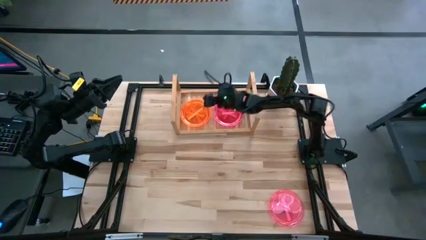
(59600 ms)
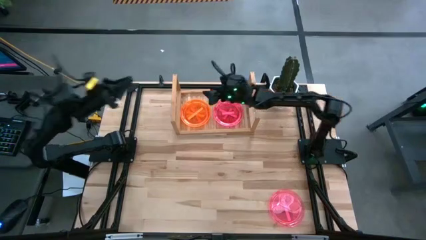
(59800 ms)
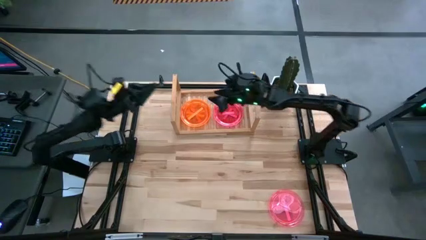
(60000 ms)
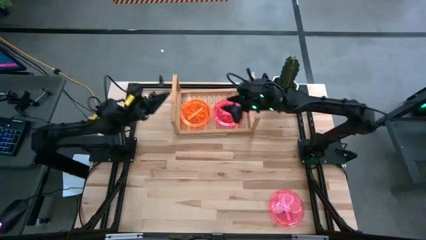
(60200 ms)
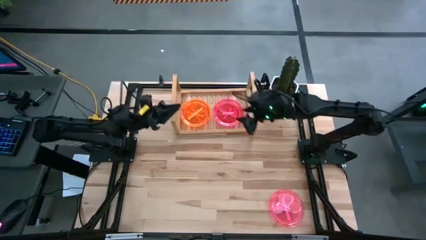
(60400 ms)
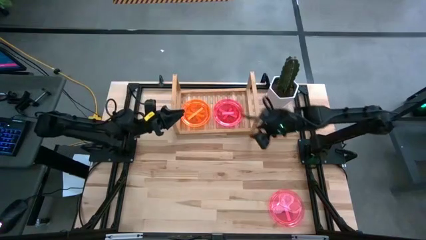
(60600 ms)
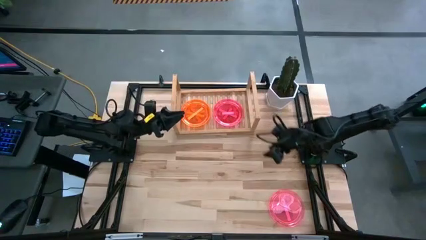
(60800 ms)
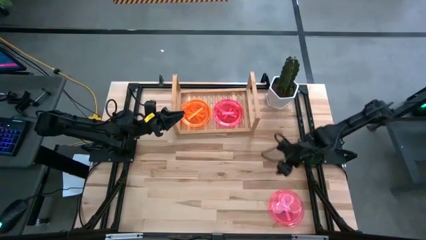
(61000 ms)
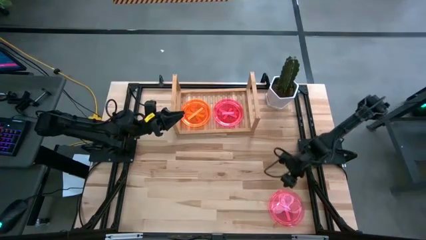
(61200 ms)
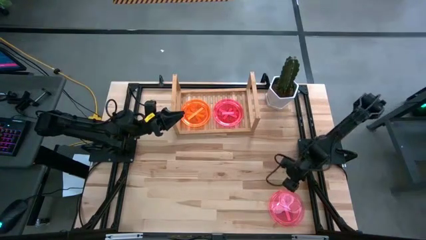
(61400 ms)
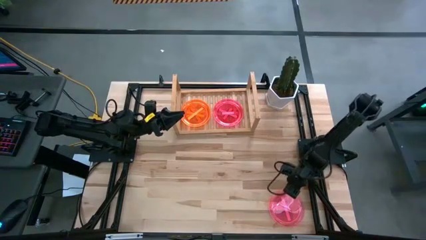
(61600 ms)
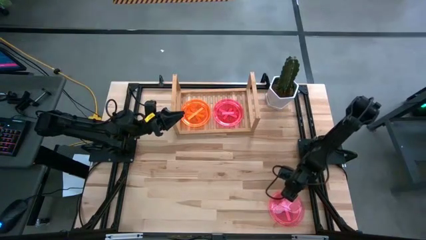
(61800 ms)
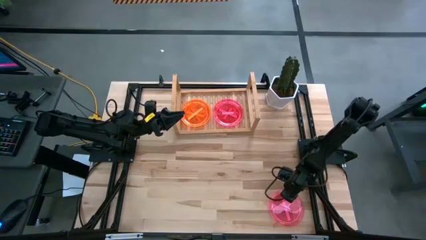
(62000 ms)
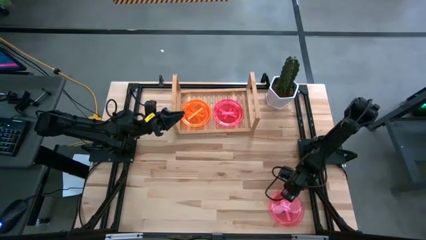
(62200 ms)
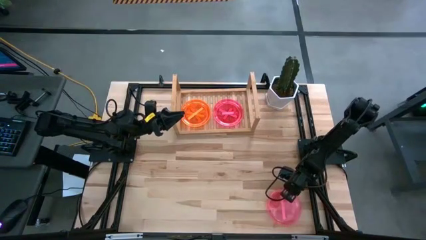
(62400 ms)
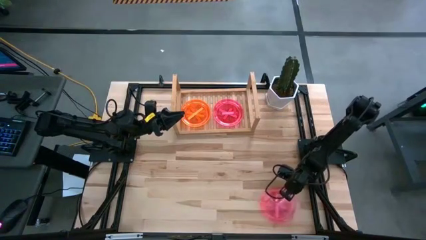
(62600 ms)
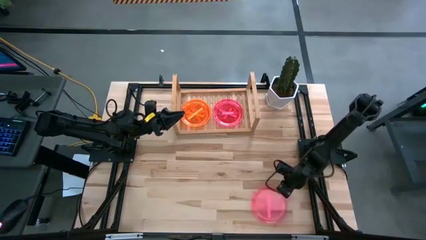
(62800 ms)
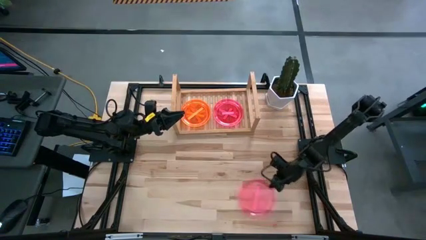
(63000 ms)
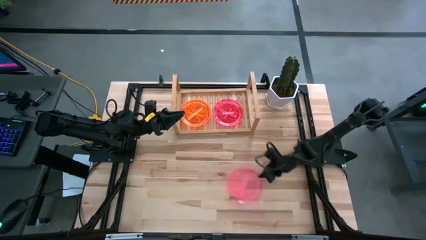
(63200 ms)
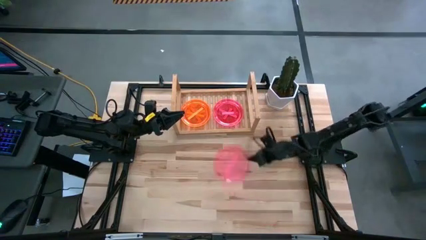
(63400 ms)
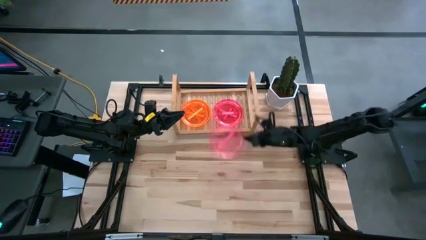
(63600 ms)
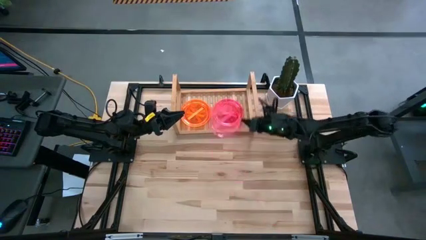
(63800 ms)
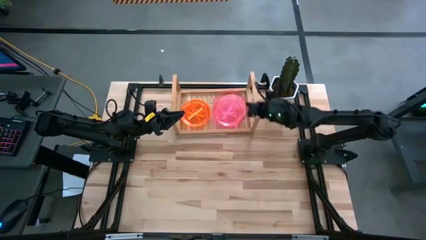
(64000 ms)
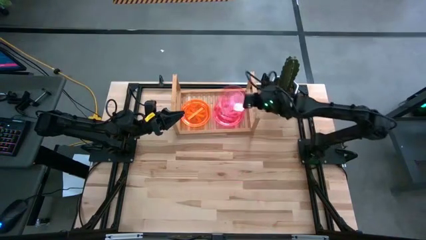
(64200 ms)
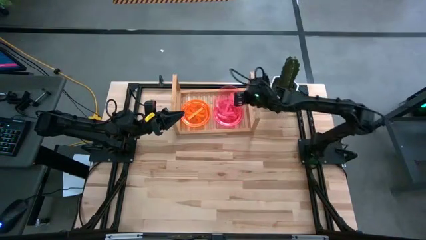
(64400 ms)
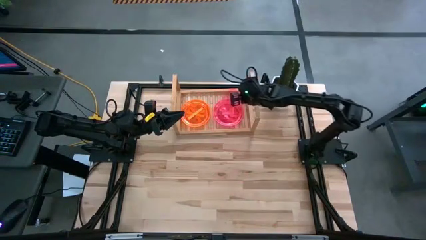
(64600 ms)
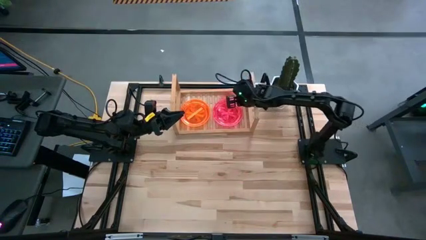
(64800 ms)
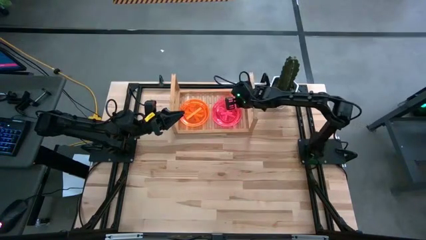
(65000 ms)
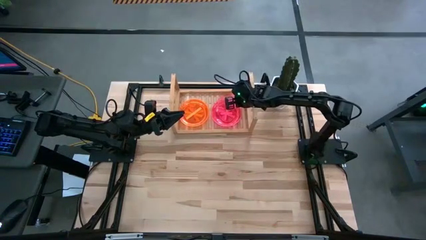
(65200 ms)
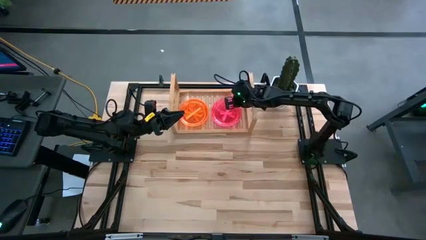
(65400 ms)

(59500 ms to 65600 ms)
Task: Place and stack plates onto a shelf
Stack the pink plate on top of the pink plate

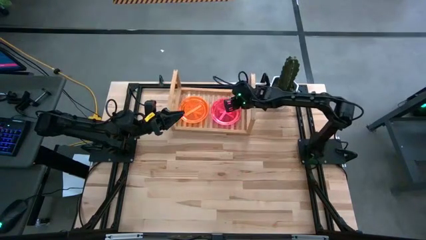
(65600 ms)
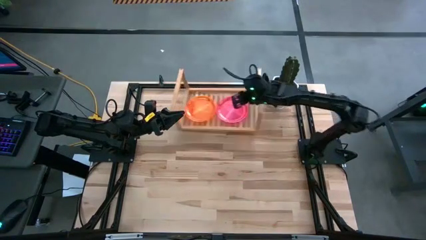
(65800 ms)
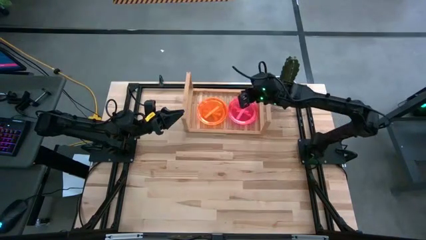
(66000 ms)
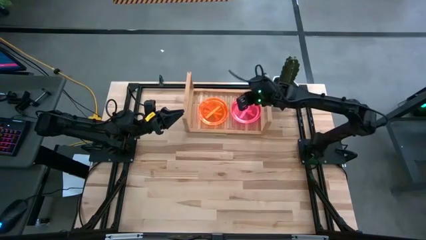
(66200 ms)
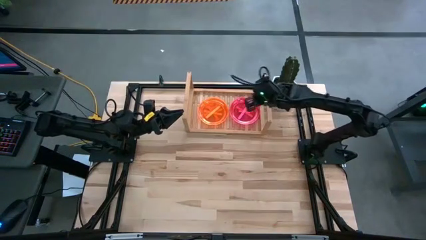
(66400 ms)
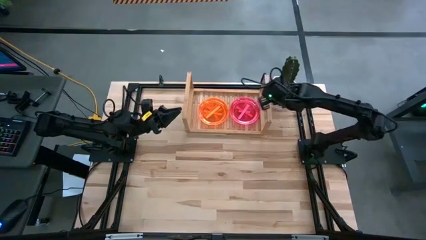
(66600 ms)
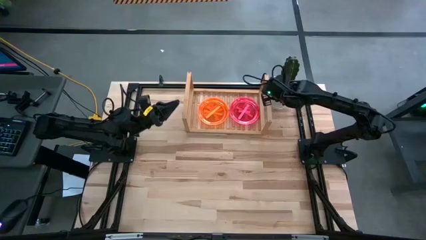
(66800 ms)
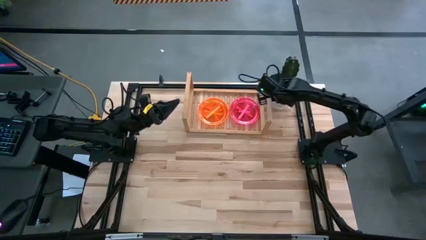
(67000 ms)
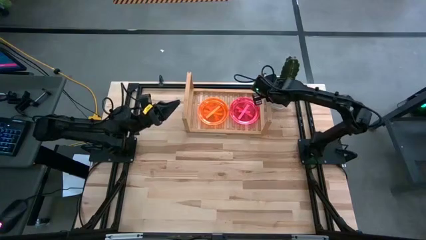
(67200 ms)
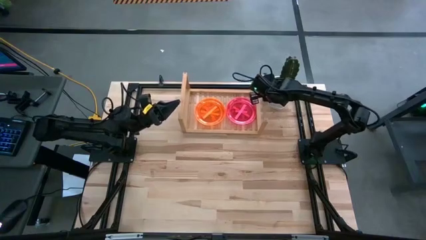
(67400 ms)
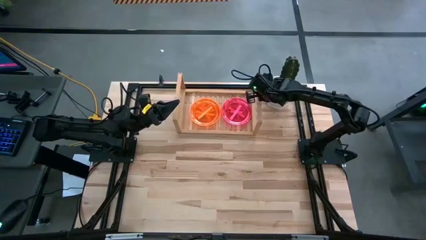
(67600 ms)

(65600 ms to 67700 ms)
Adjust the shelf

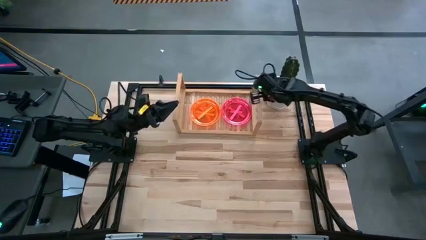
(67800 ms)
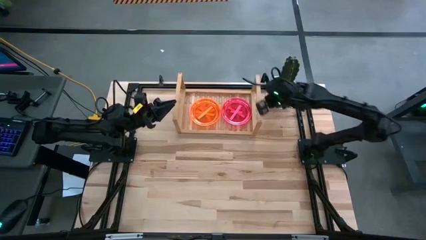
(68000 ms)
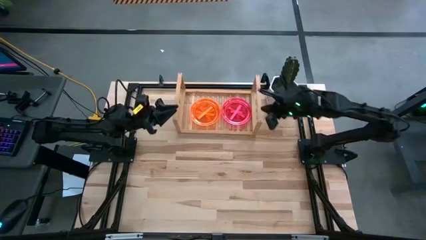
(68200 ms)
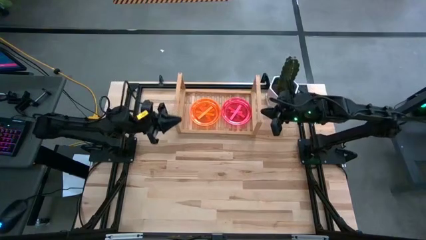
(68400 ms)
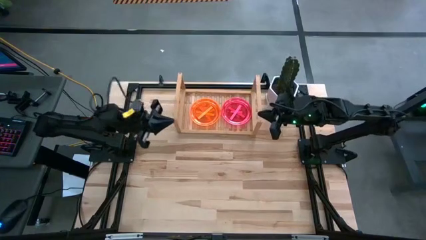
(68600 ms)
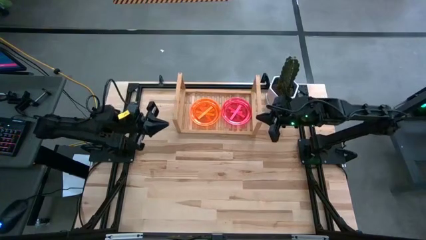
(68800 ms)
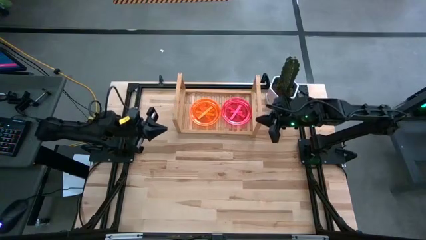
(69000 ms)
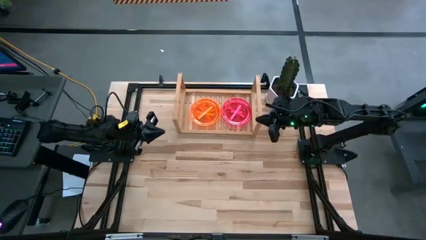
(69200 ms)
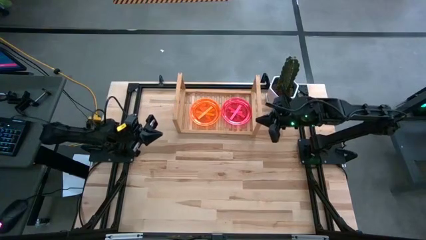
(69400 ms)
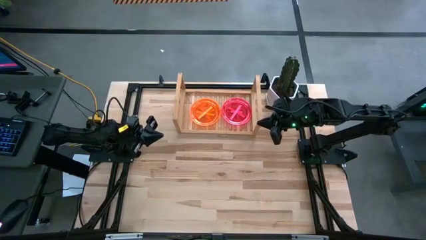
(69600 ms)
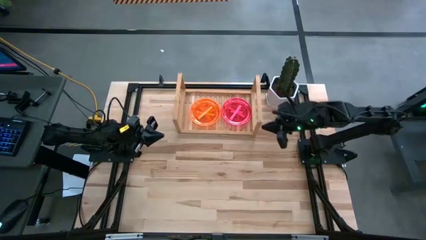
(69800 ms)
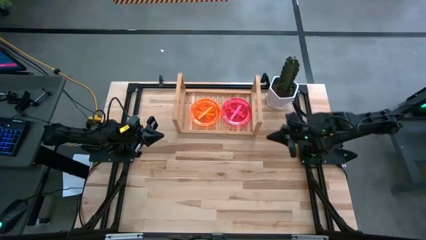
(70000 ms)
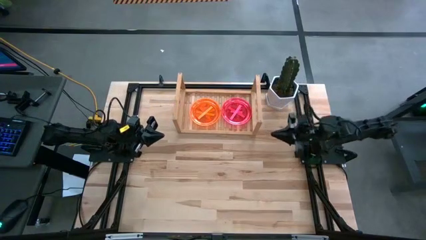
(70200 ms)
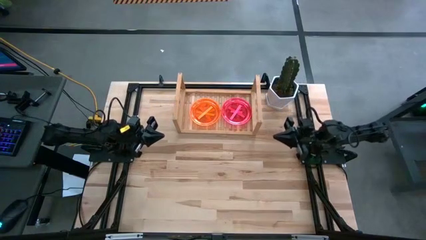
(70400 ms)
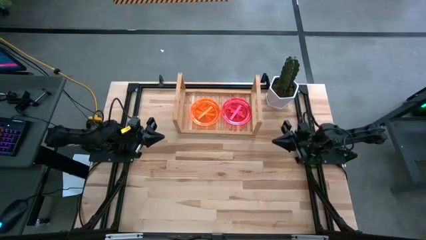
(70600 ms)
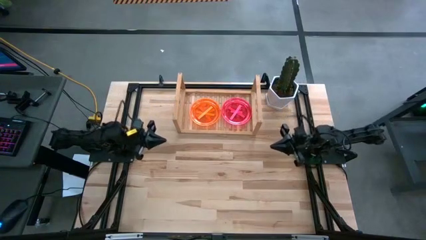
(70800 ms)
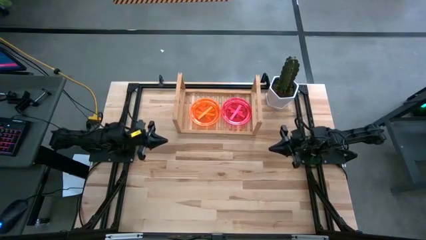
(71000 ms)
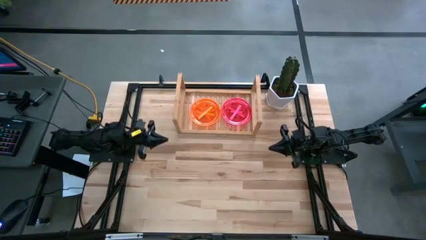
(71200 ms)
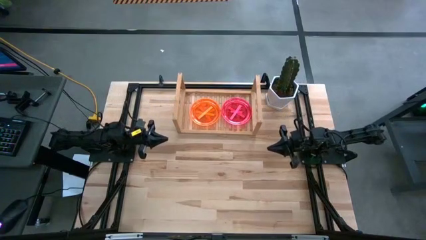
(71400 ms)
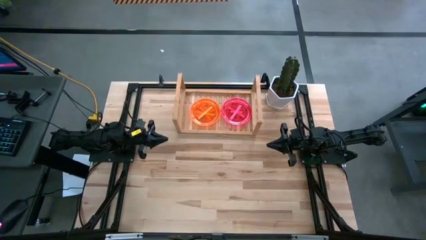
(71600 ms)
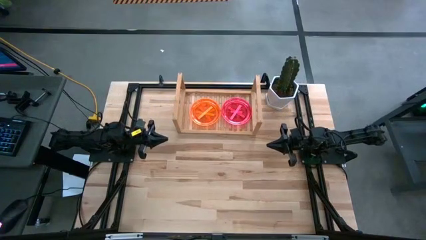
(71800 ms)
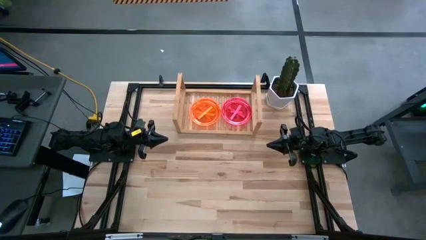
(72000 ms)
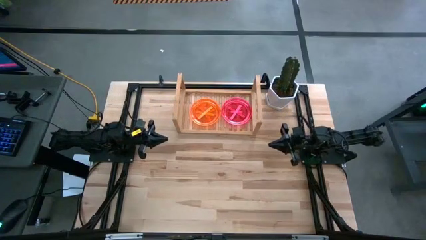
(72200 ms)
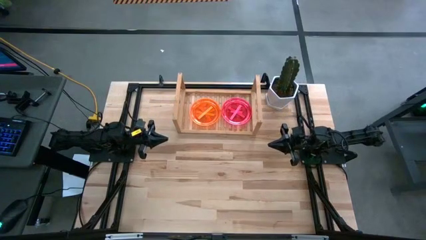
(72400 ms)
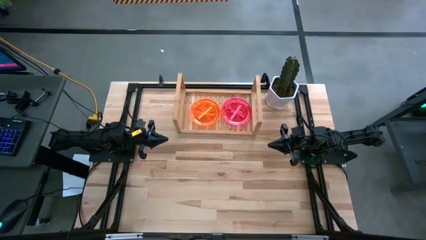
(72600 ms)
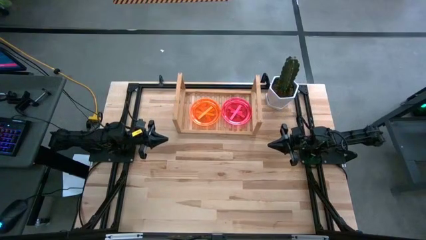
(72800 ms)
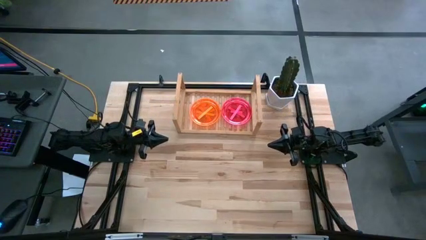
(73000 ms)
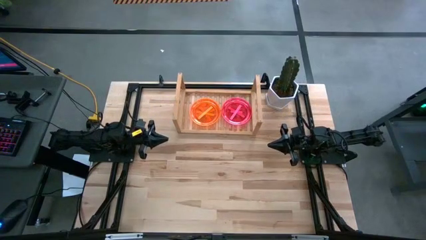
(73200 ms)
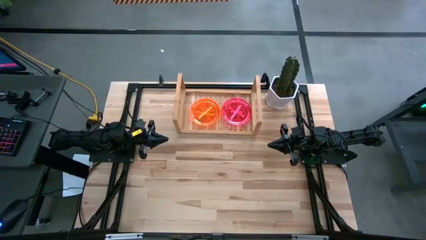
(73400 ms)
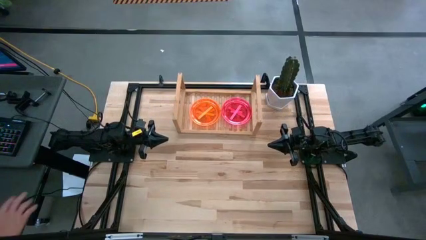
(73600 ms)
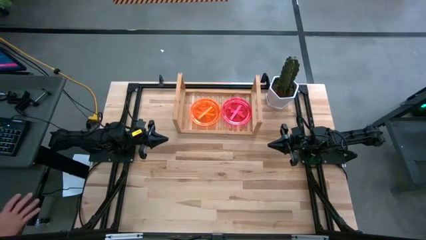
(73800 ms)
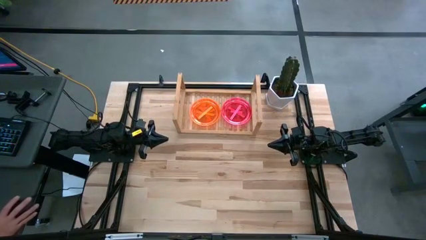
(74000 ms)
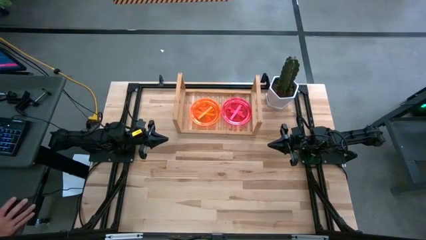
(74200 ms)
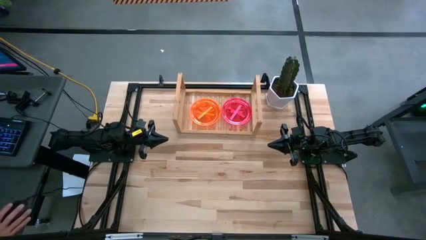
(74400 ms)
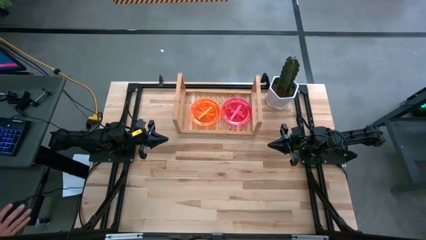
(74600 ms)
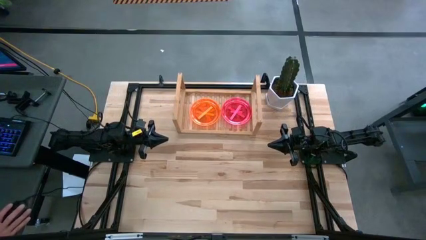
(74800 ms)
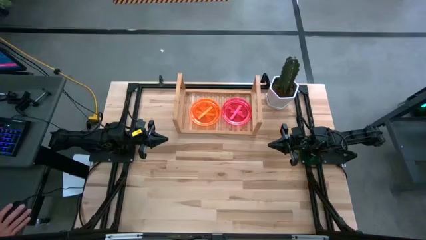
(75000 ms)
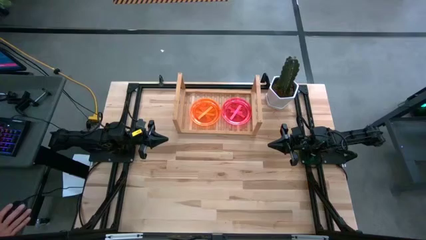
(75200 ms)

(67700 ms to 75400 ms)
Return to Home Position

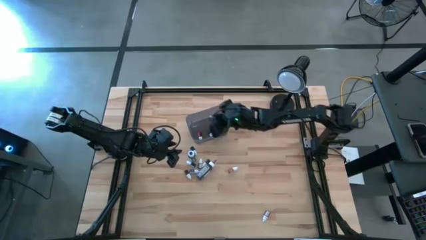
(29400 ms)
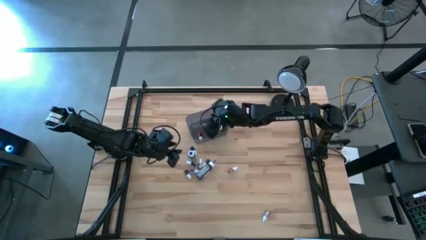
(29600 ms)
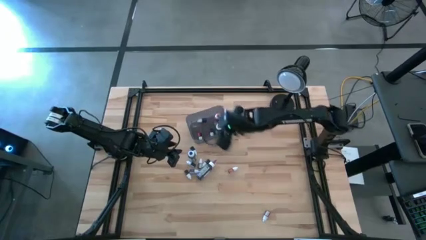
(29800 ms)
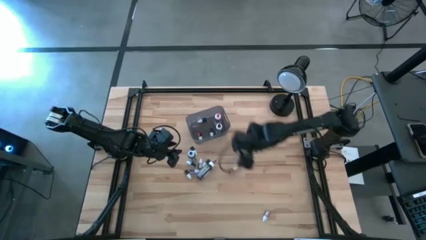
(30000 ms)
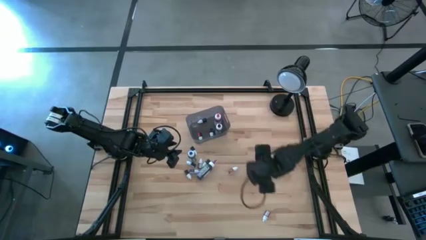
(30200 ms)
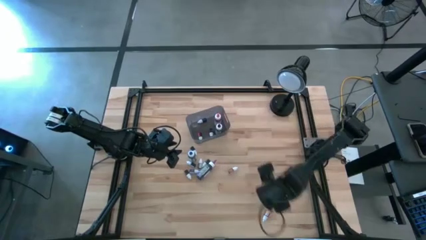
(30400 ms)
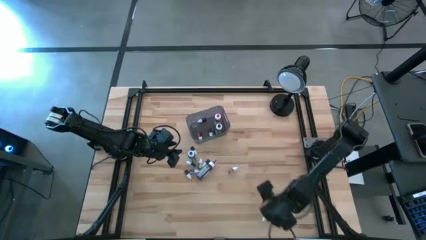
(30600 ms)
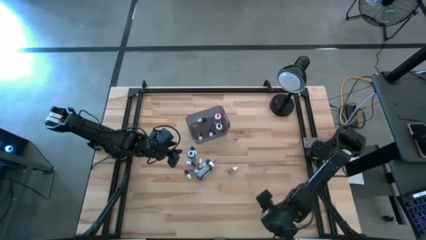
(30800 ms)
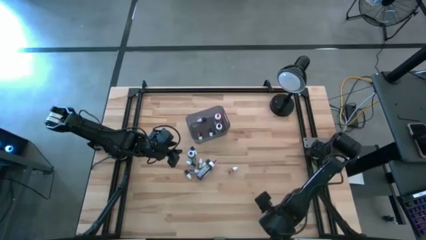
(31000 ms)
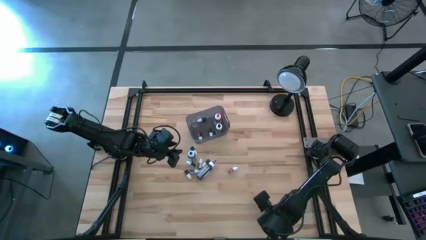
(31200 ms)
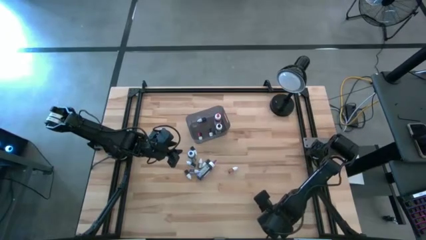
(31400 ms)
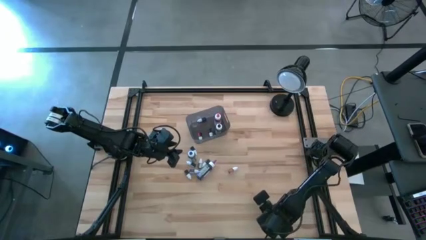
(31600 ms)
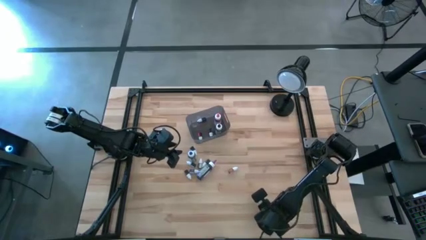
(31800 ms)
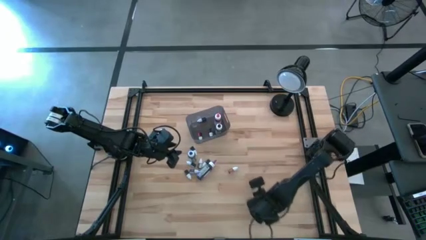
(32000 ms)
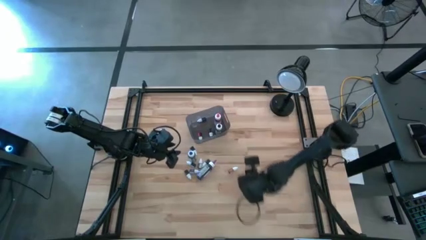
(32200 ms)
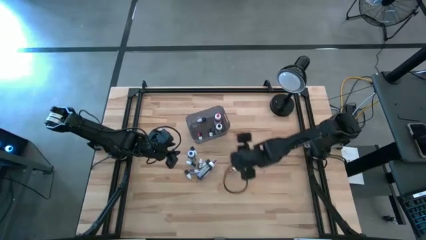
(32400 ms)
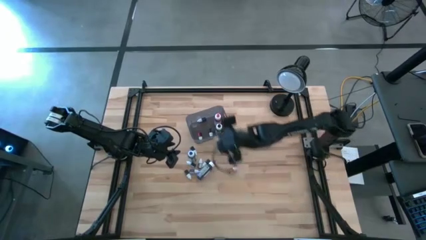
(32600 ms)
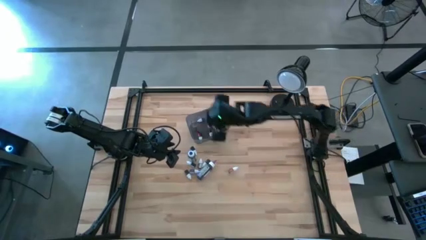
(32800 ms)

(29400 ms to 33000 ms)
Task: Pick & Place food coloring
Put the small red food coloring bottle into the gray bin
